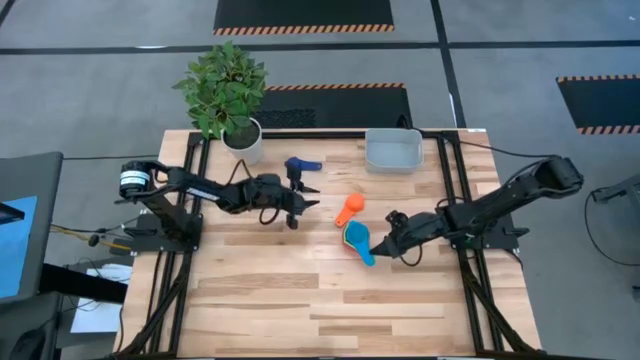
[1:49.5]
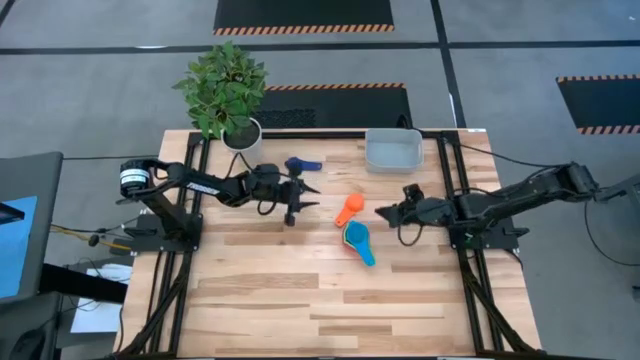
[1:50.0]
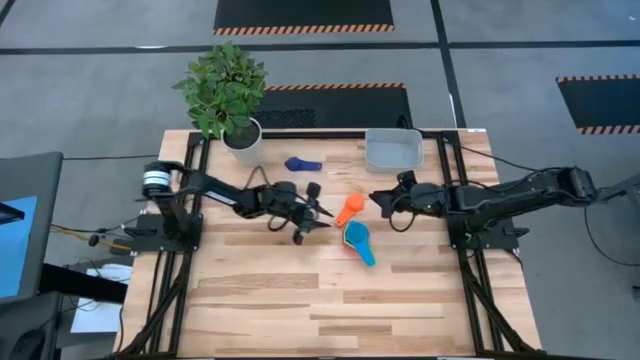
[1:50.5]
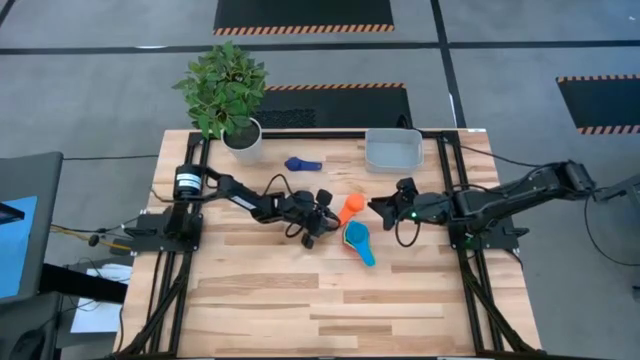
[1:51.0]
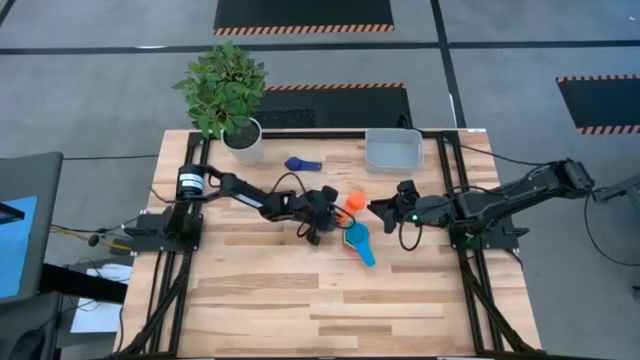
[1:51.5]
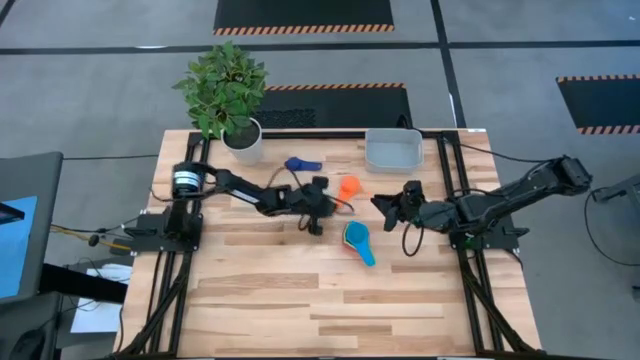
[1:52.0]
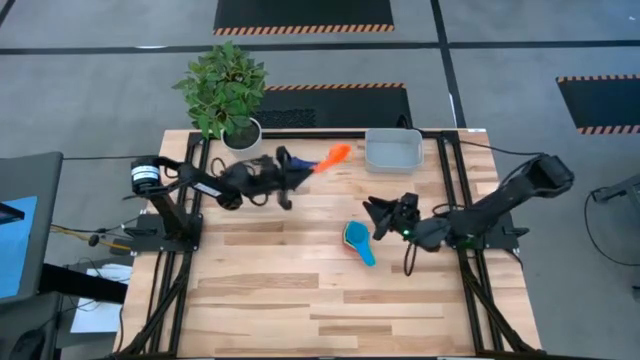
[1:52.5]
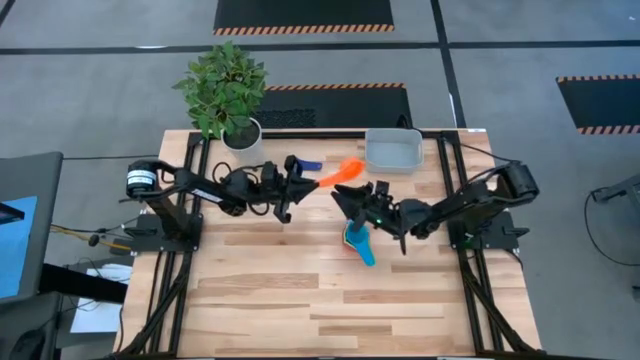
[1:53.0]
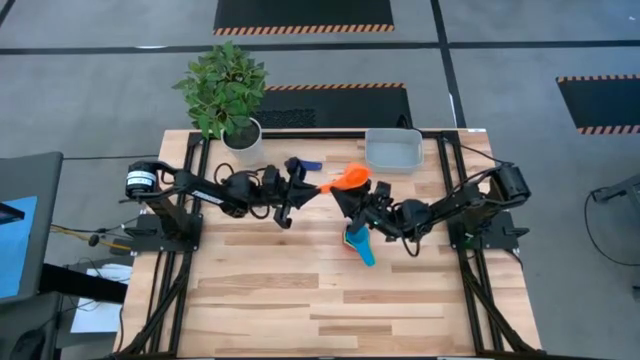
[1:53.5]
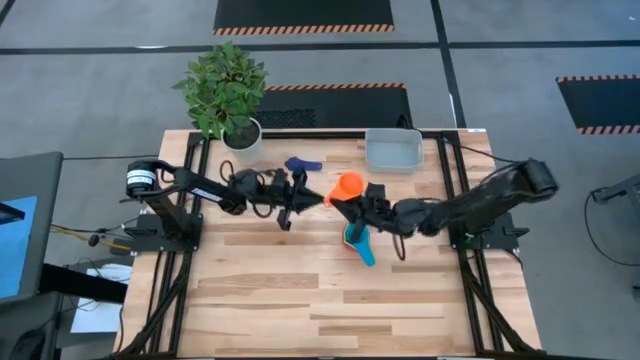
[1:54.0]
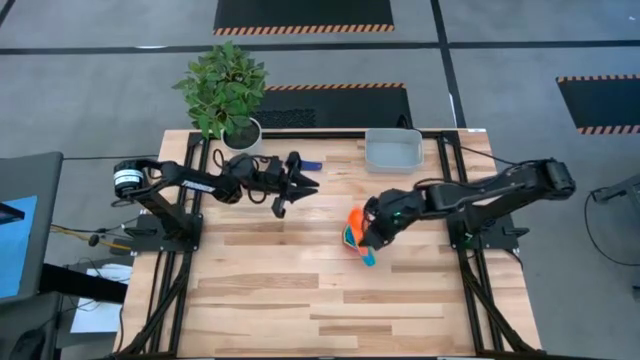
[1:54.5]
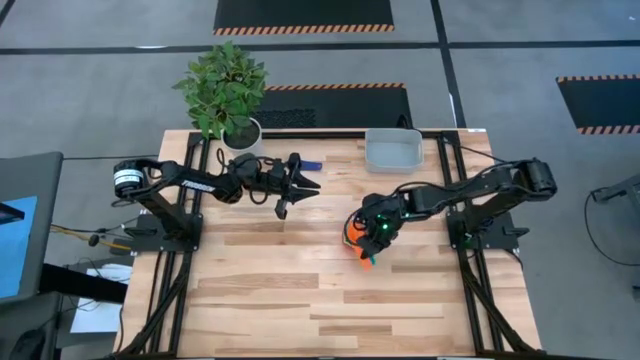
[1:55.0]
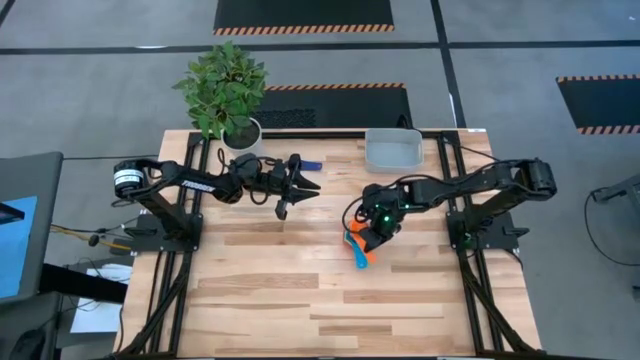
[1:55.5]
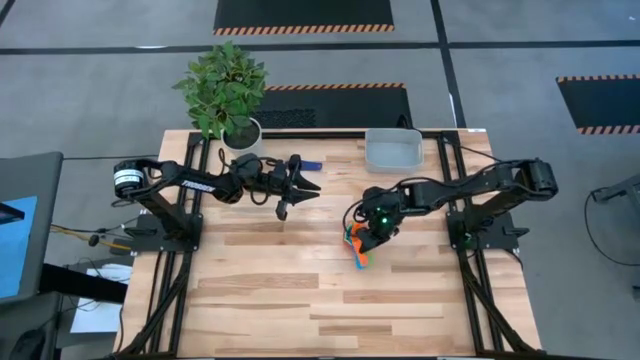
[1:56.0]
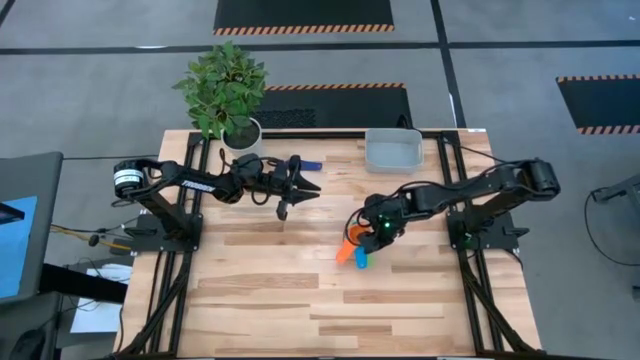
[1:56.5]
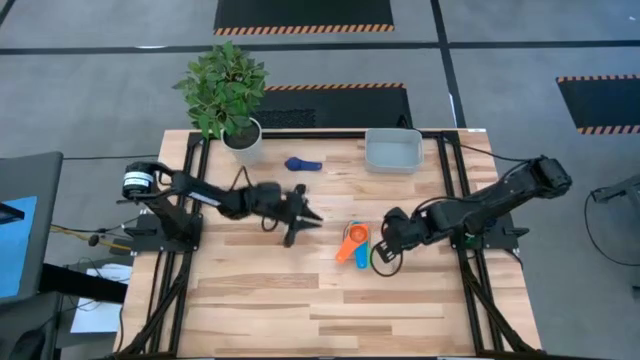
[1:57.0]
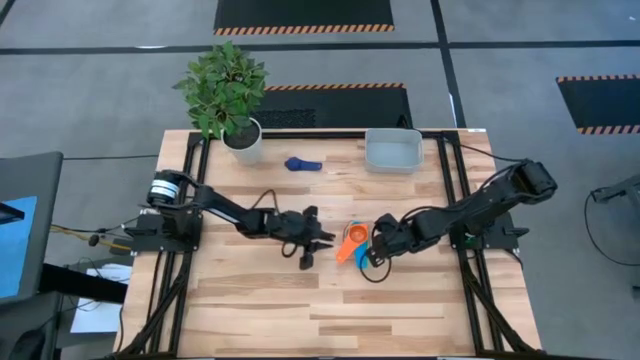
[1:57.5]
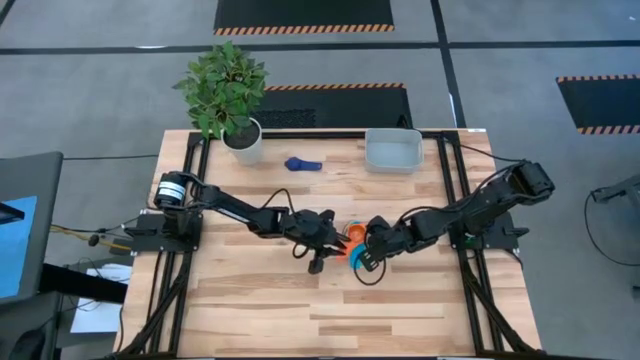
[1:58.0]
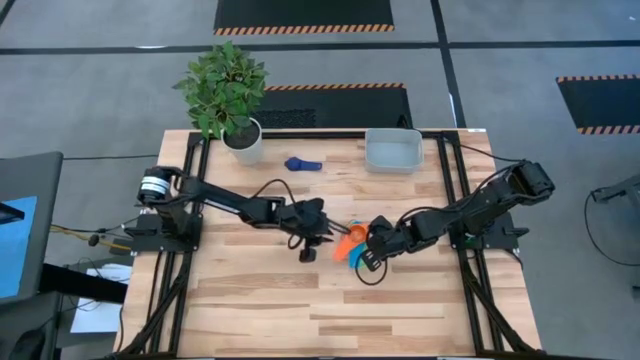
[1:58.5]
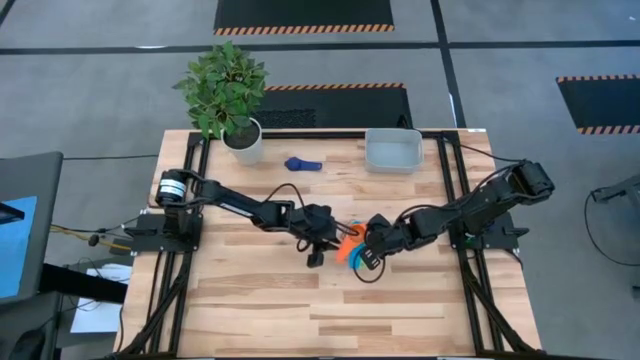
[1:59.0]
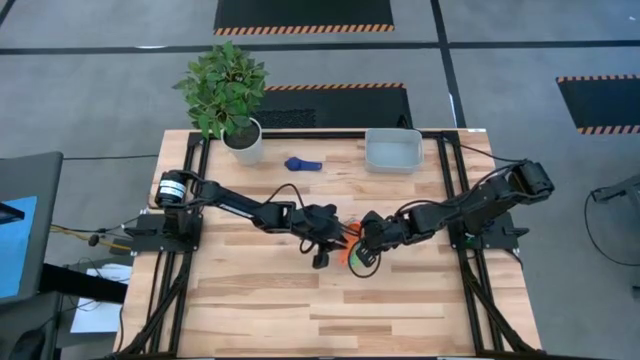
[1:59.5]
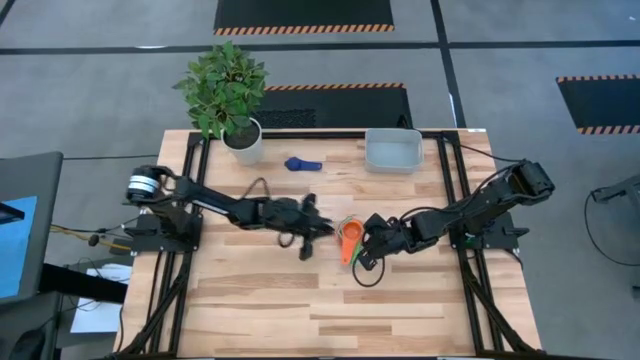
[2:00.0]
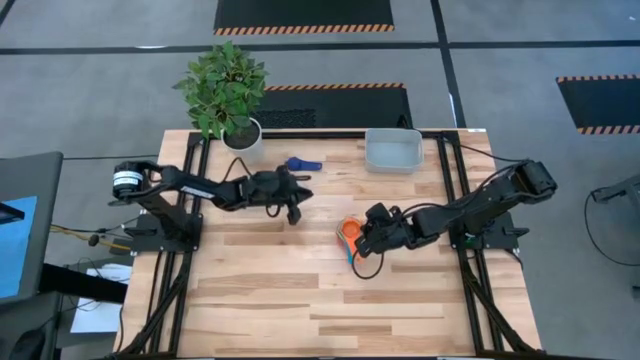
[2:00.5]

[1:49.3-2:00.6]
Task: Nest measuring cups in basket
Stack the orange measuring cup on top of the light blue measuring cup

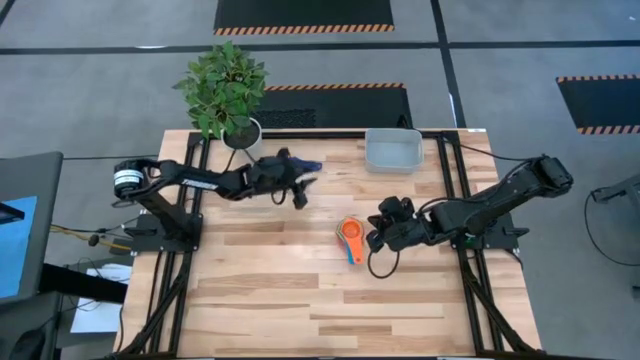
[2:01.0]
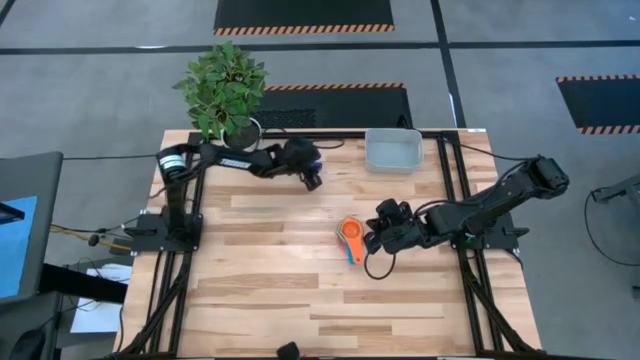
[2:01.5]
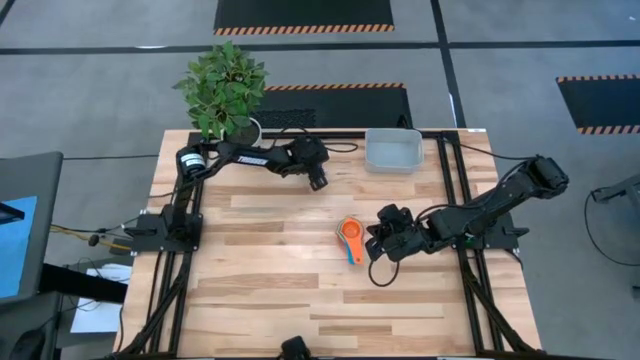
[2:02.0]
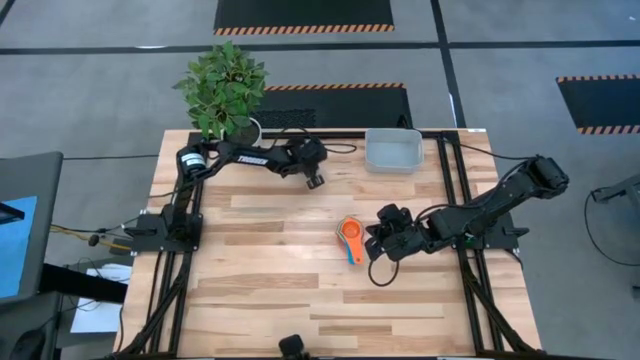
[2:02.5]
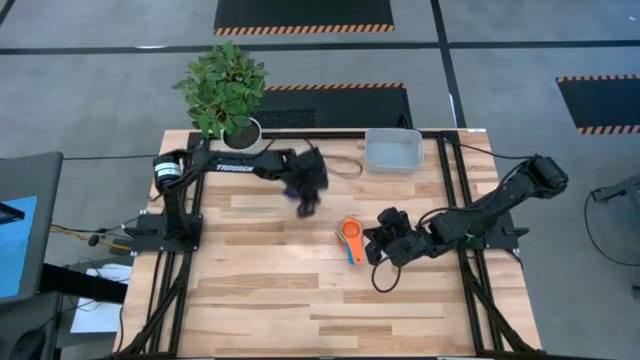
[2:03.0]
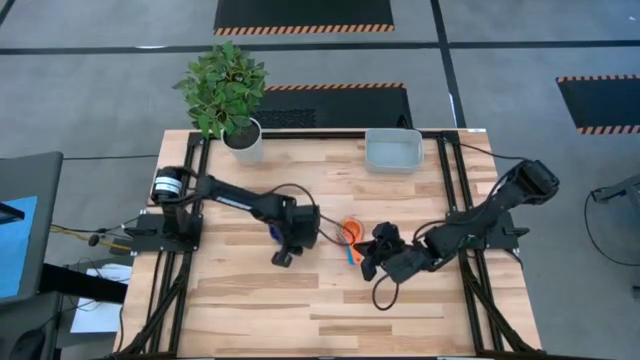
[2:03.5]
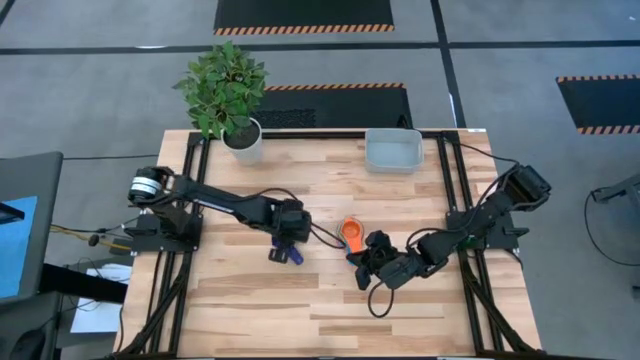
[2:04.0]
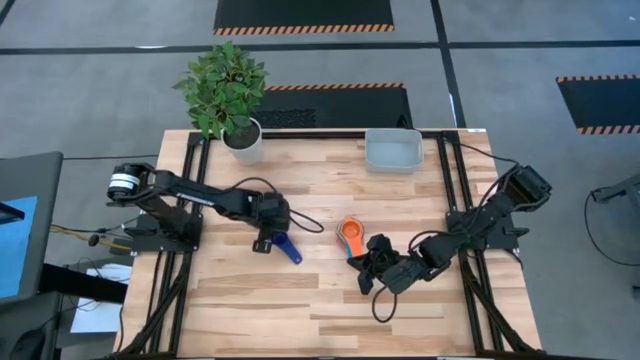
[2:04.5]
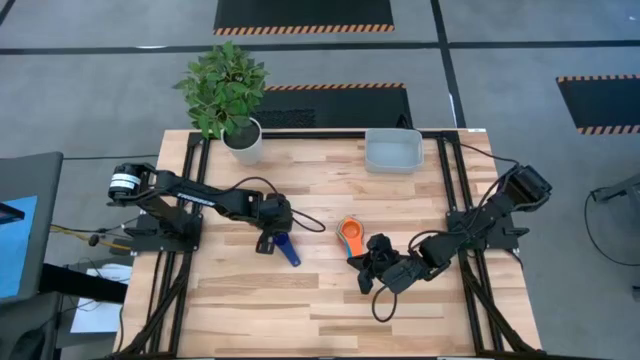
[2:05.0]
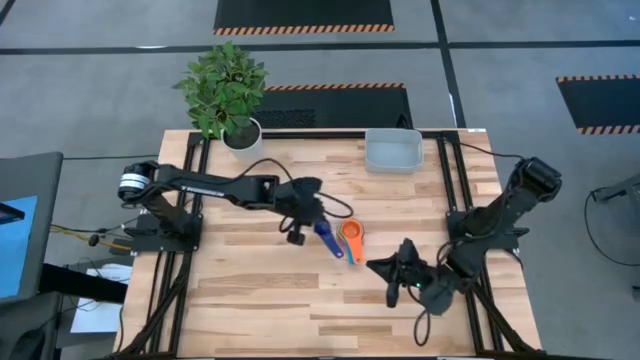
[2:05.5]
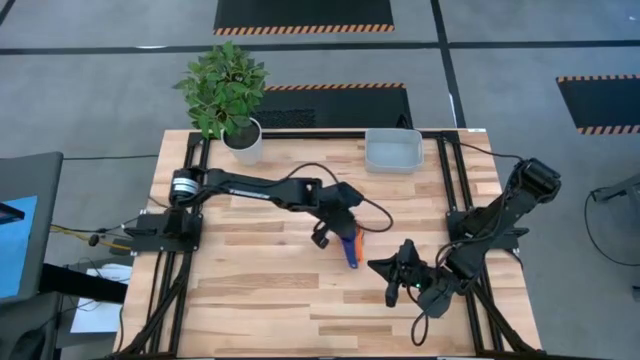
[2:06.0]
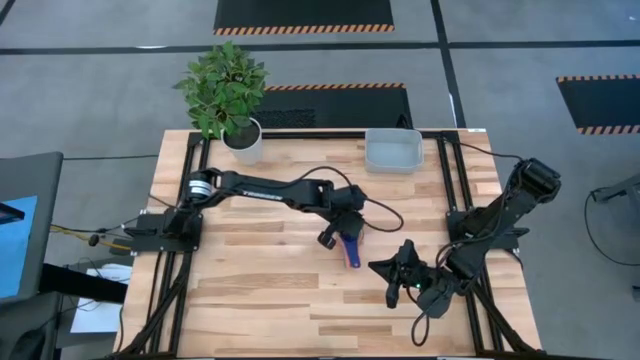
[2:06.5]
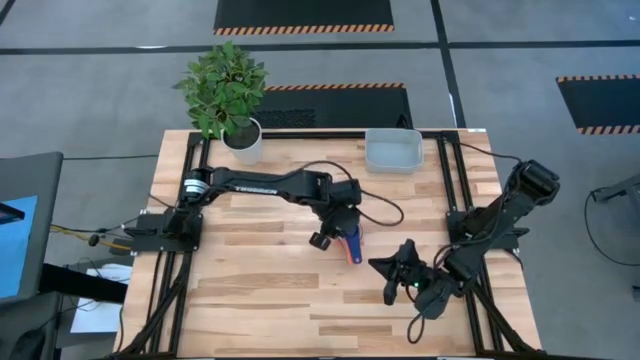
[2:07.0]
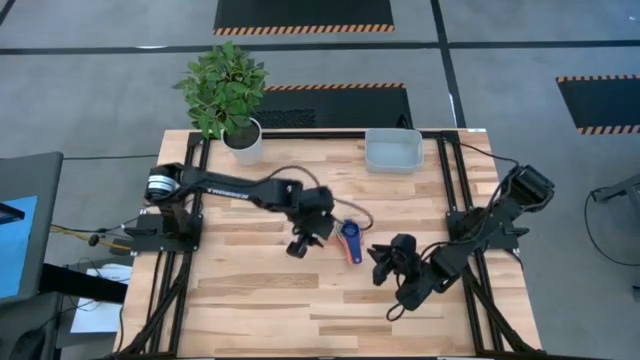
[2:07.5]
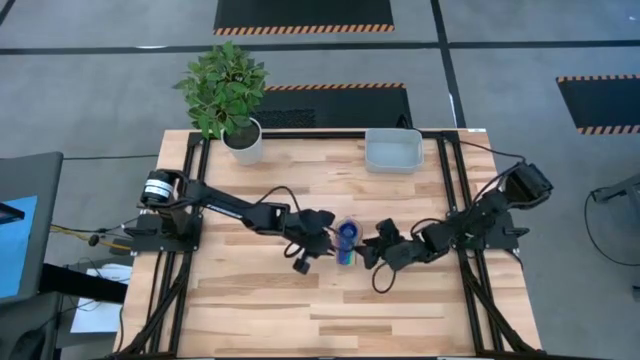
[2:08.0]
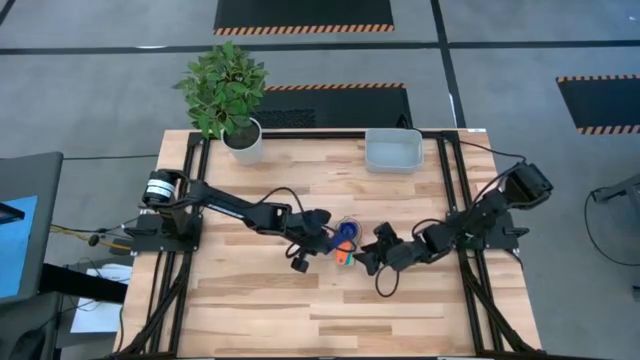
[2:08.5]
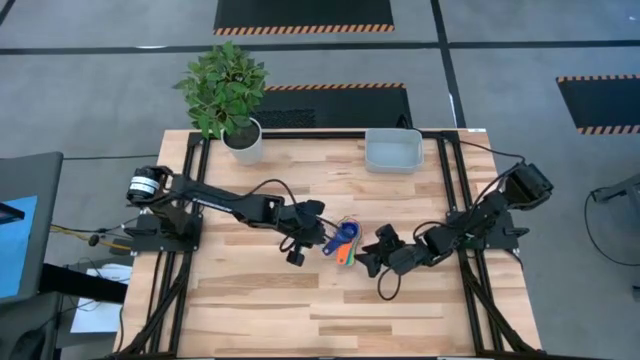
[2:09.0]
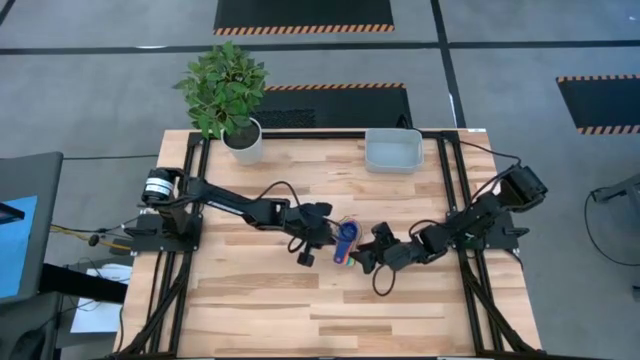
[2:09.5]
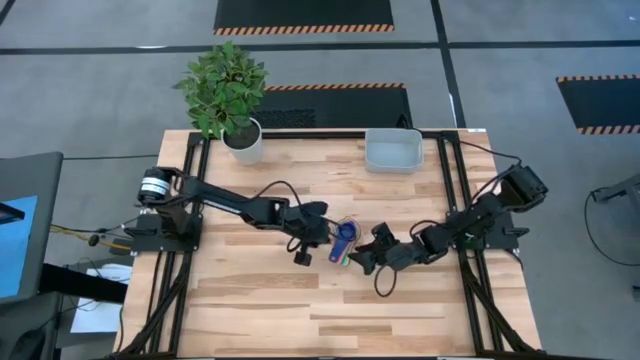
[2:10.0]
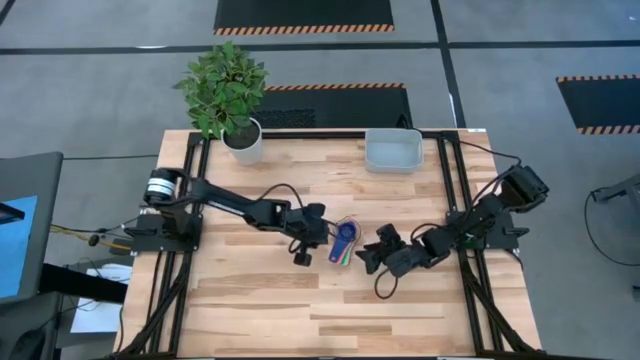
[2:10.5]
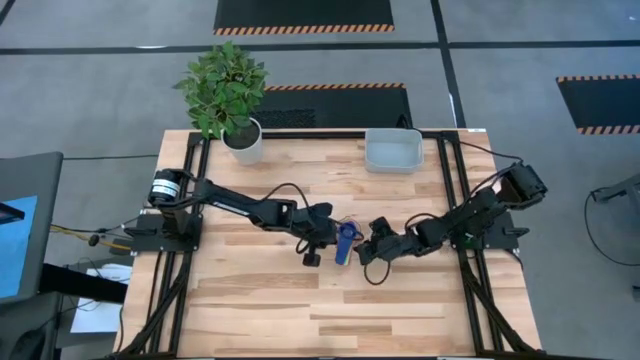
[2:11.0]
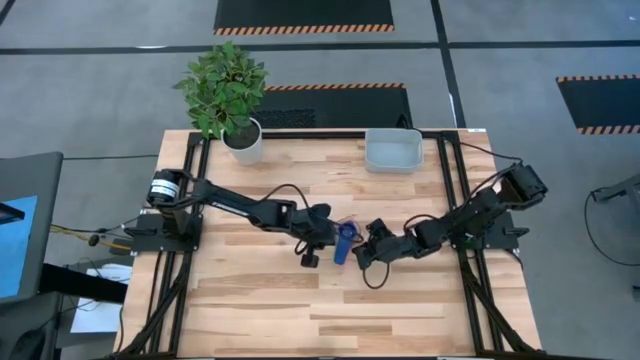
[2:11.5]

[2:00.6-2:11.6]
Stack the dark blue measuring cup on top of the orange measuring cup
